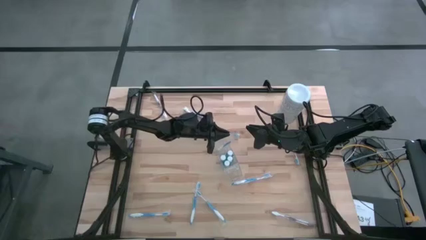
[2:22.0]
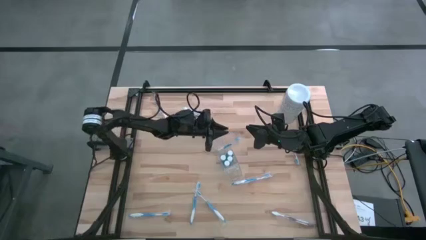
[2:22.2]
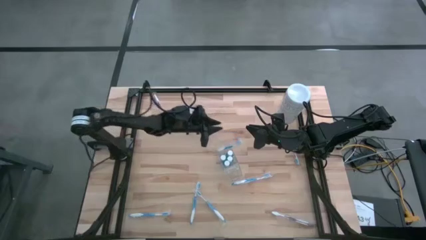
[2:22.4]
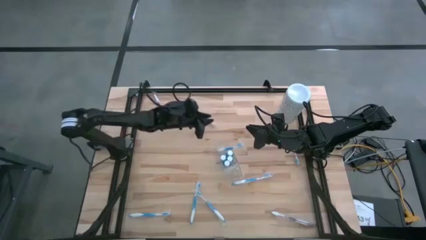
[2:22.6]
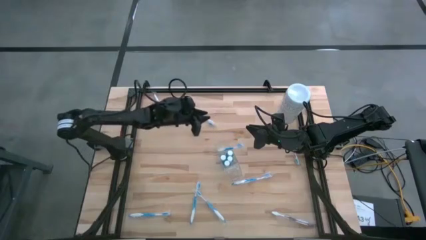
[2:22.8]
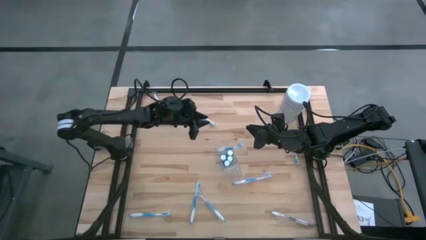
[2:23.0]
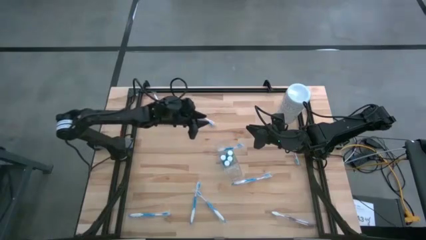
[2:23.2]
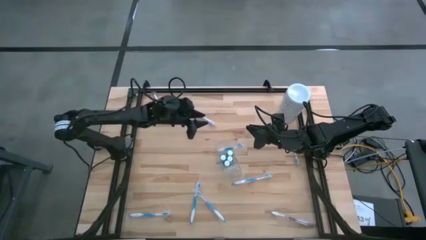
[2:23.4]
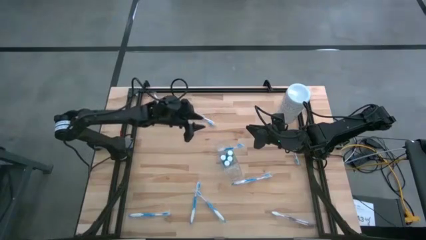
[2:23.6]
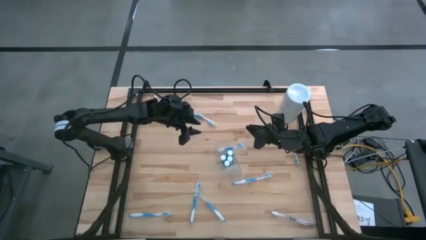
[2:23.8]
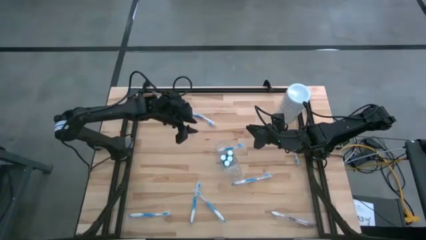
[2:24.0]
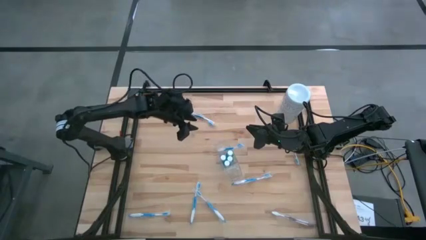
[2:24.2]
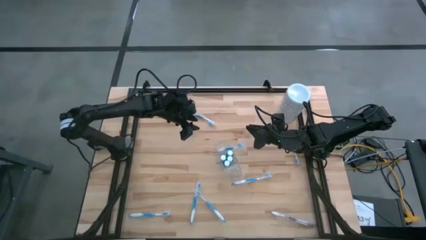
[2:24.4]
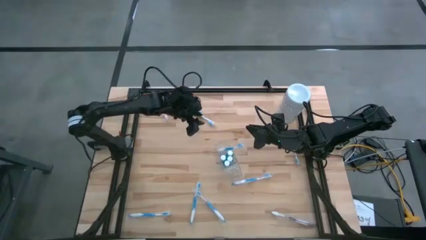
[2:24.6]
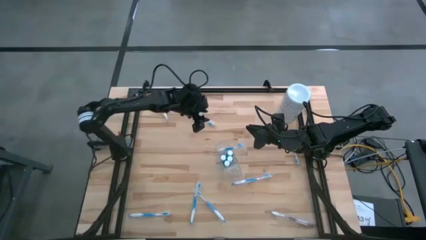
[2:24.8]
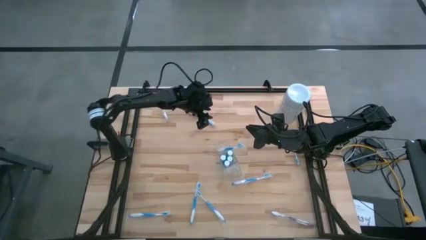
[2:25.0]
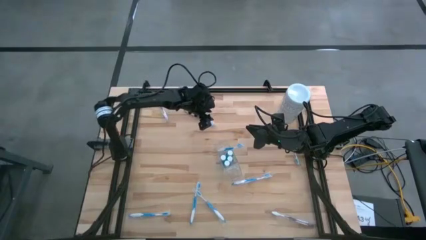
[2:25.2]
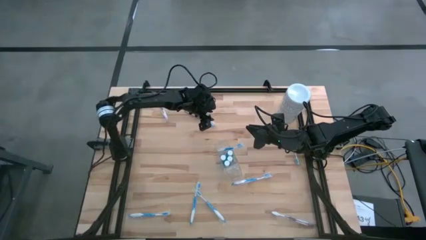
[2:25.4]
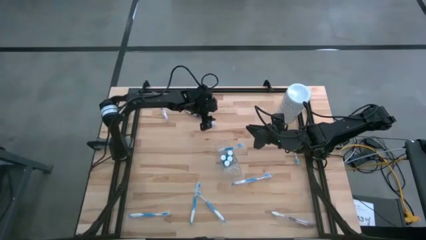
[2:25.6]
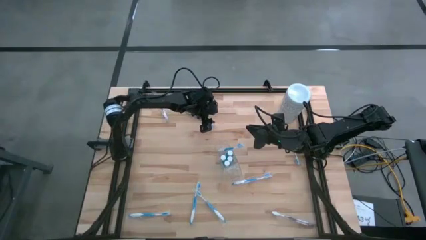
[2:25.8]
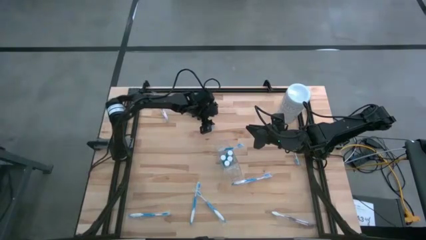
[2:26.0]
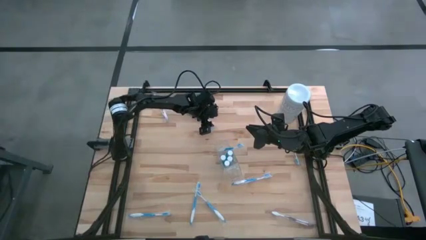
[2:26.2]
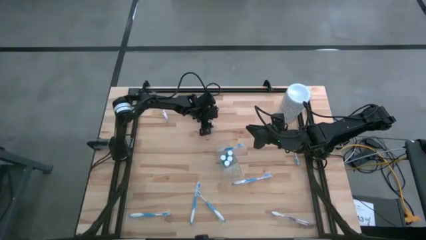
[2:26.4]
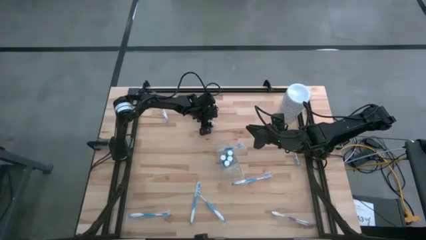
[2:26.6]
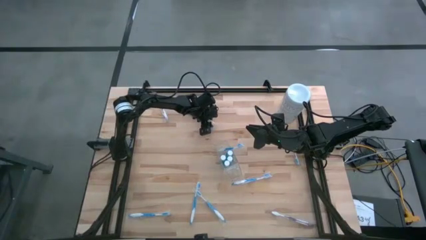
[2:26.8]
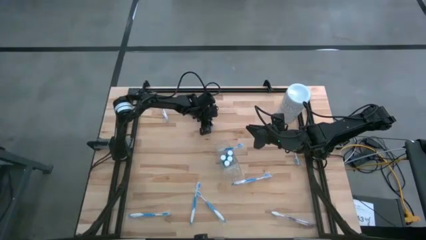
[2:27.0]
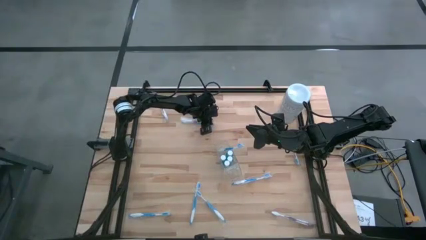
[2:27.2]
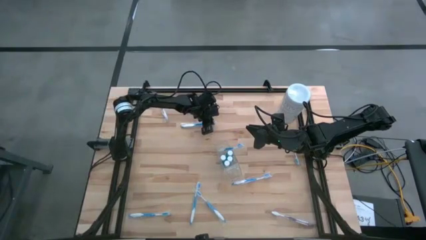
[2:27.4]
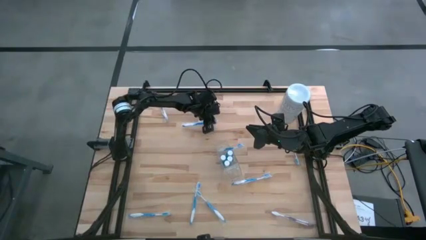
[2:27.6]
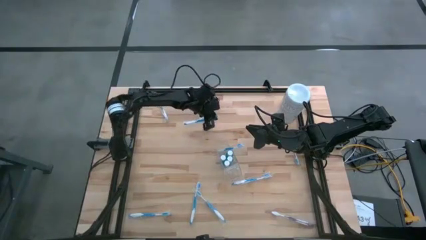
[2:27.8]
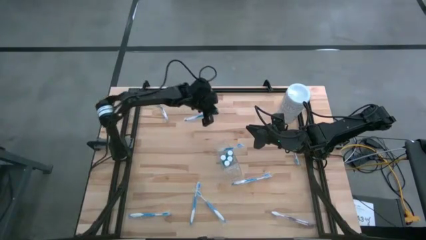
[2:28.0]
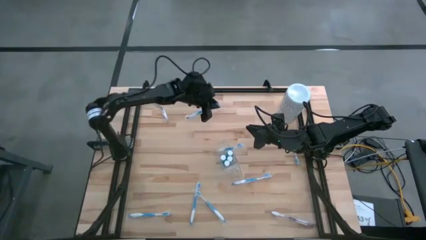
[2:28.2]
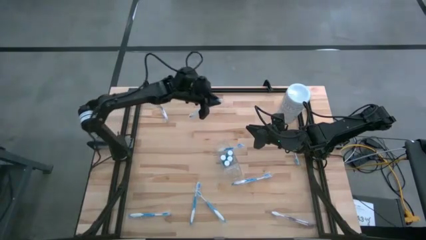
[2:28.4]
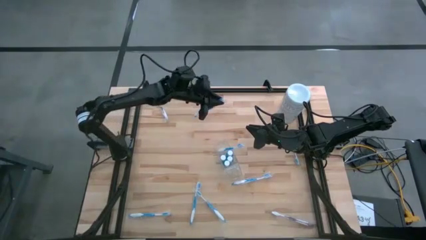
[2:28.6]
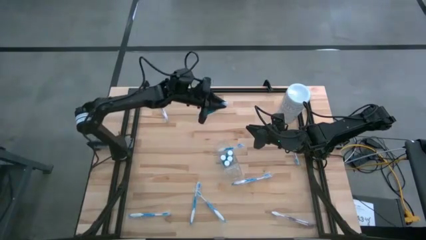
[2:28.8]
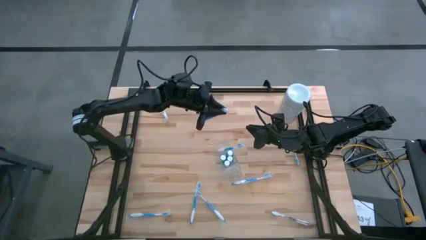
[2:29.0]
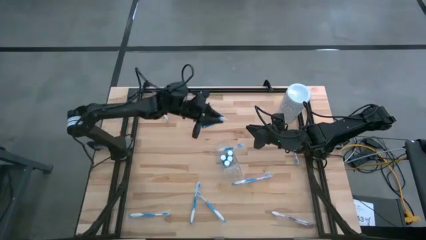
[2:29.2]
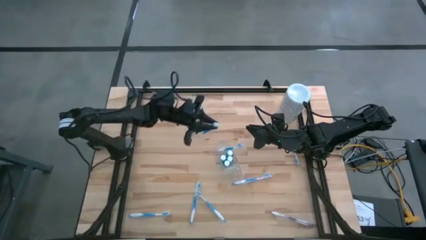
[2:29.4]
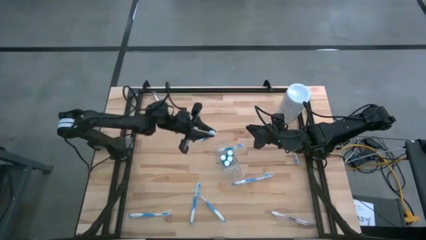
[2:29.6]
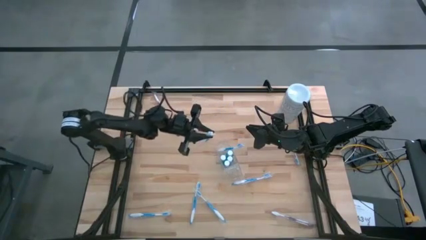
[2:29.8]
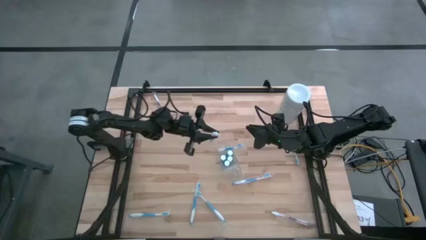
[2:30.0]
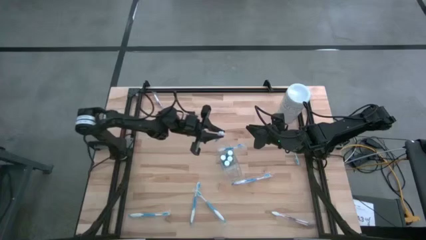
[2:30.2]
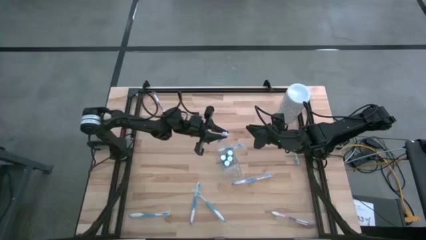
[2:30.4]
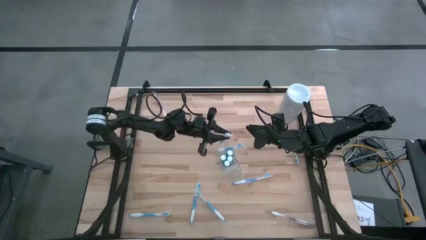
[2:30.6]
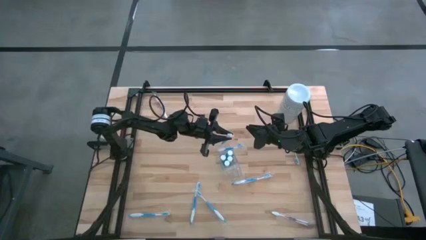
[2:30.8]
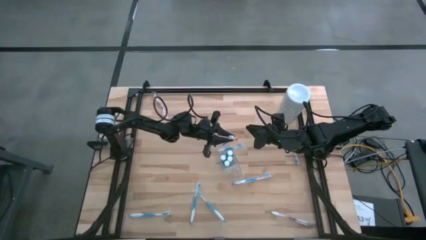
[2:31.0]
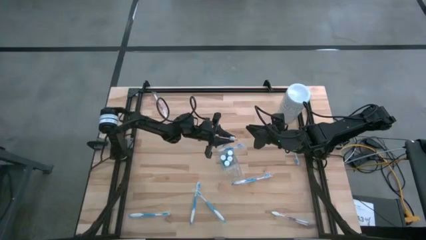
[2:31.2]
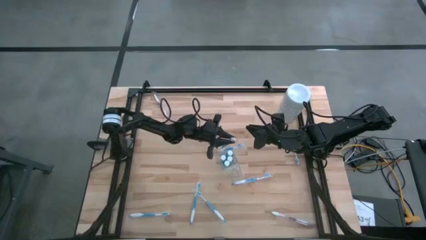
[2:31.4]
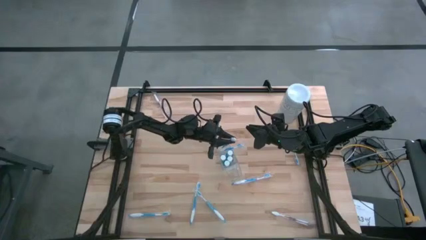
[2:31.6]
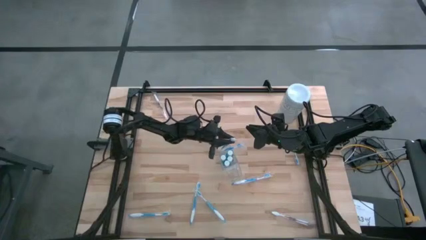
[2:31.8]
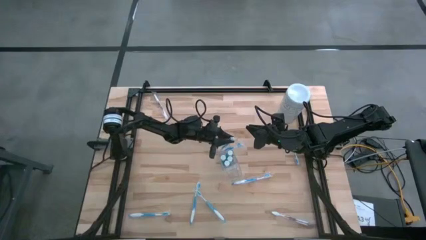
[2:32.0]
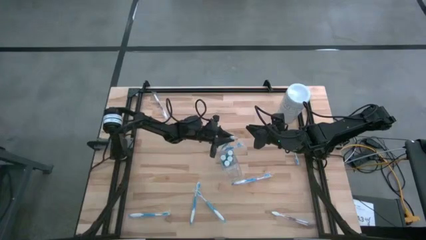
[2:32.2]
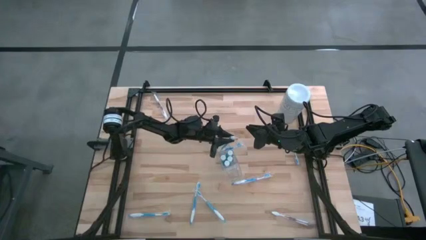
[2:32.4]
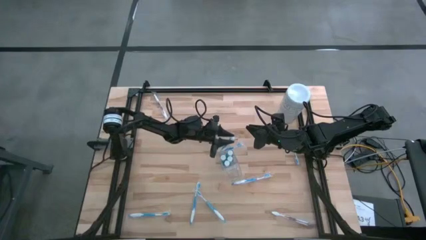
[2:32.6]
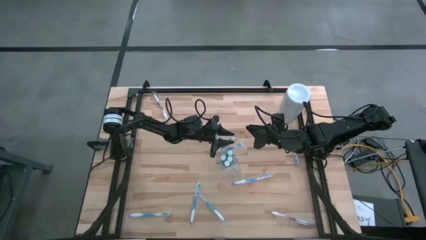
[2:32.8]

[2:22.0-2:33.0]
Task: Pick & Place toothbrushing station
Put the blue toothbrush into the left section of the transparent organizer

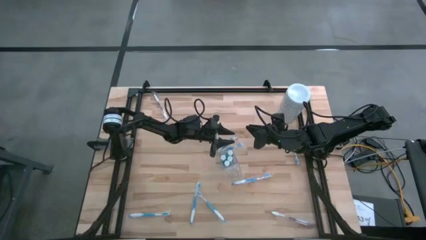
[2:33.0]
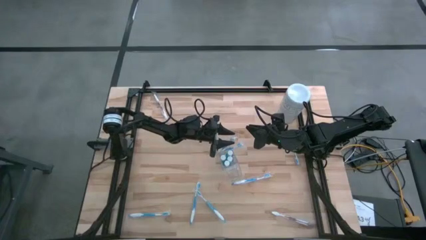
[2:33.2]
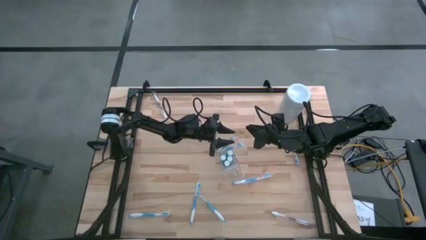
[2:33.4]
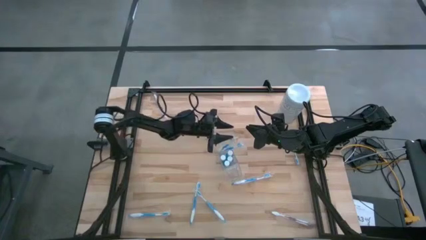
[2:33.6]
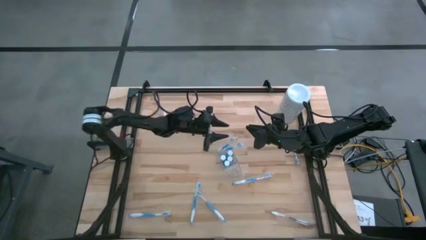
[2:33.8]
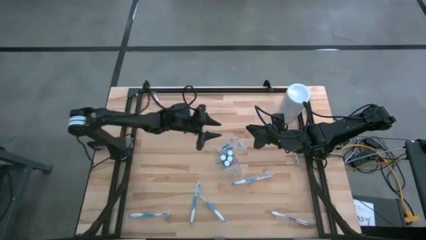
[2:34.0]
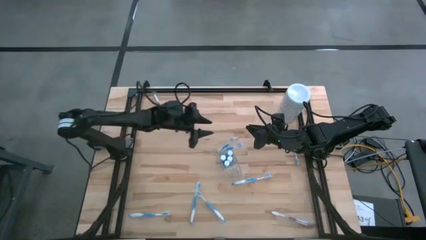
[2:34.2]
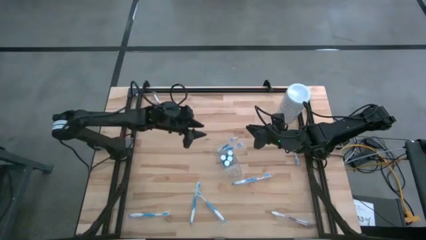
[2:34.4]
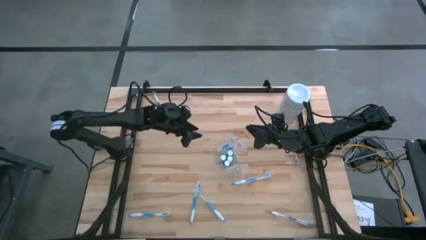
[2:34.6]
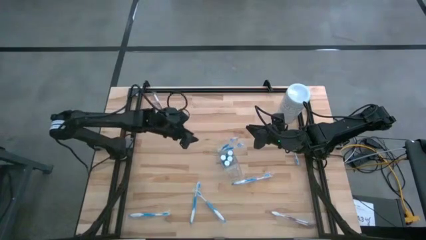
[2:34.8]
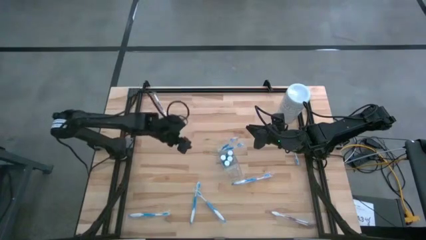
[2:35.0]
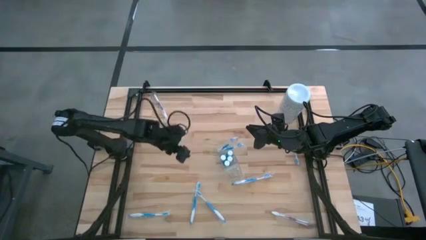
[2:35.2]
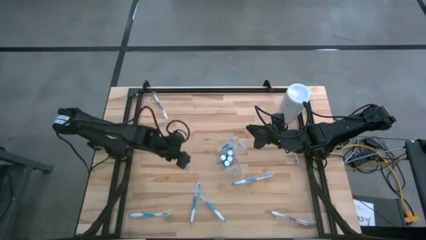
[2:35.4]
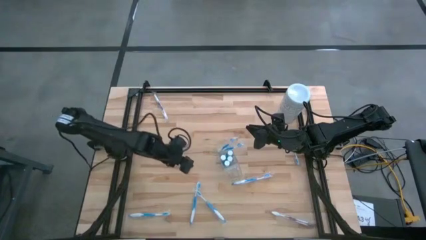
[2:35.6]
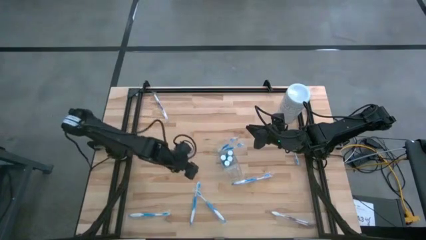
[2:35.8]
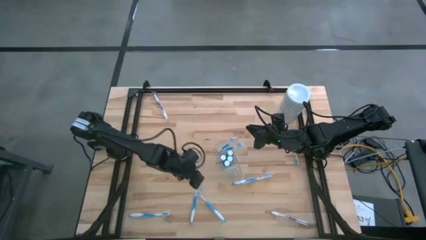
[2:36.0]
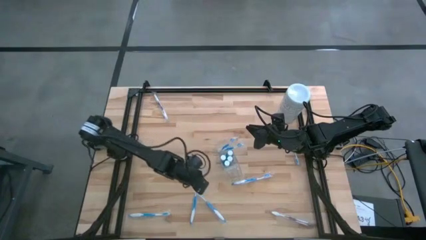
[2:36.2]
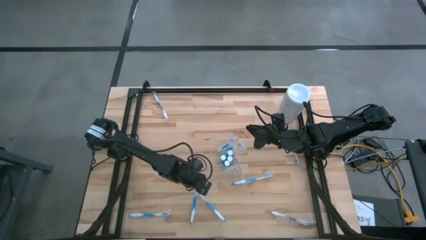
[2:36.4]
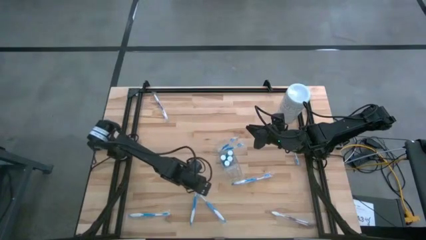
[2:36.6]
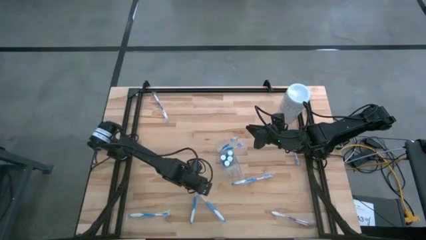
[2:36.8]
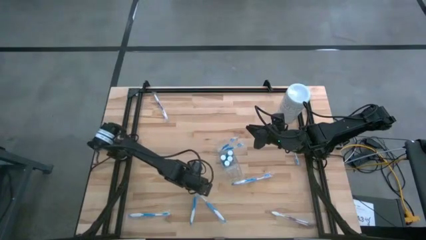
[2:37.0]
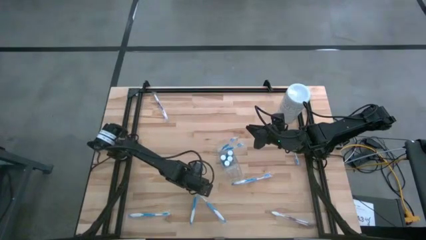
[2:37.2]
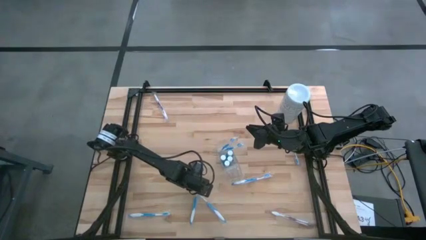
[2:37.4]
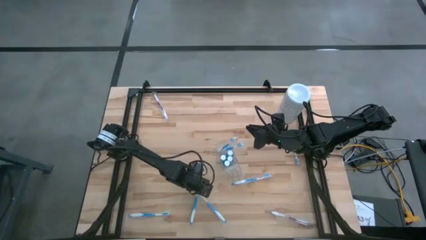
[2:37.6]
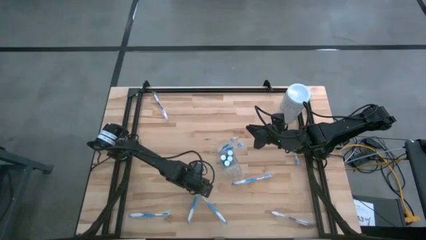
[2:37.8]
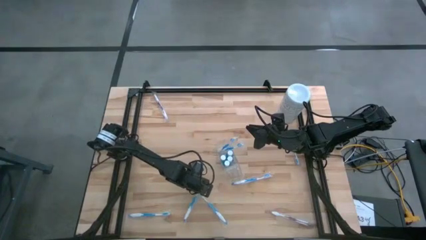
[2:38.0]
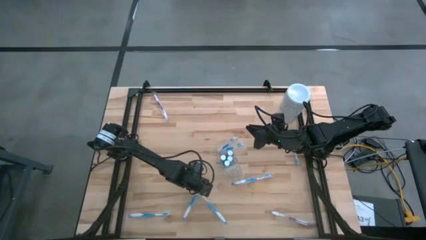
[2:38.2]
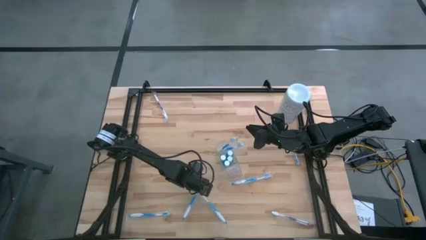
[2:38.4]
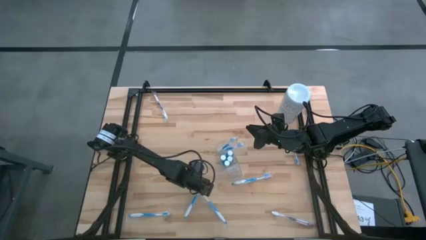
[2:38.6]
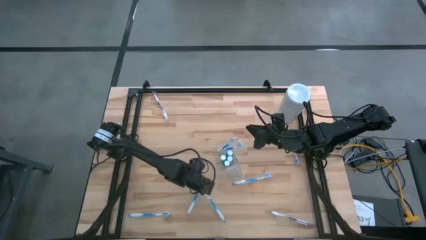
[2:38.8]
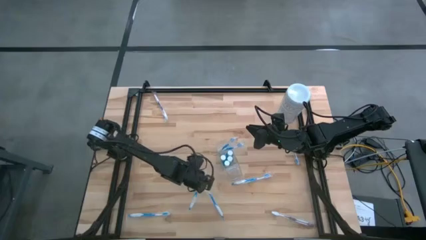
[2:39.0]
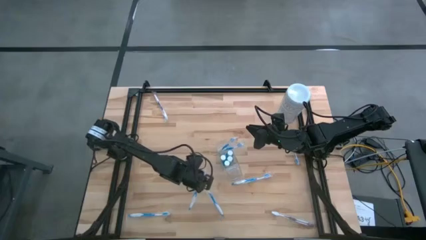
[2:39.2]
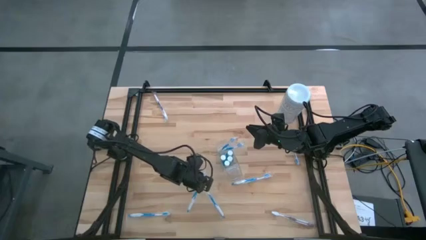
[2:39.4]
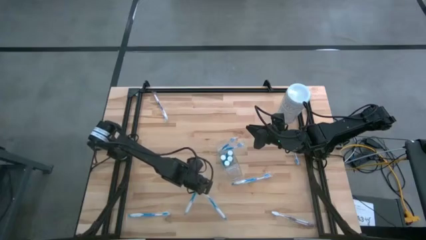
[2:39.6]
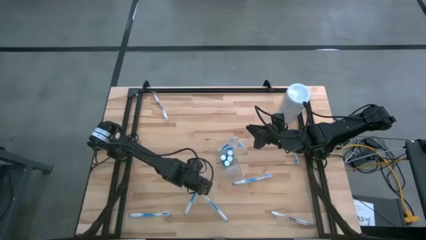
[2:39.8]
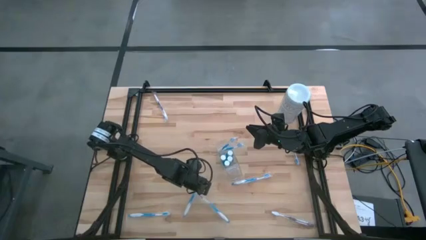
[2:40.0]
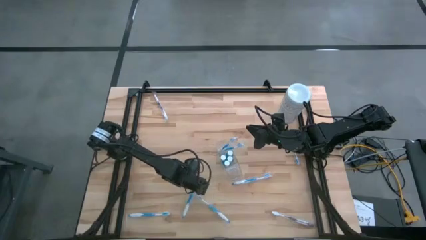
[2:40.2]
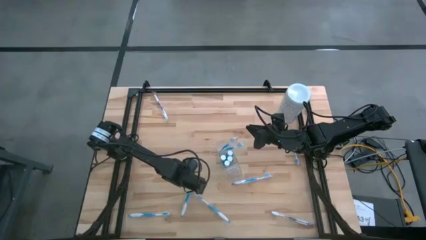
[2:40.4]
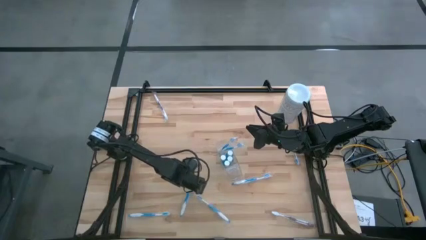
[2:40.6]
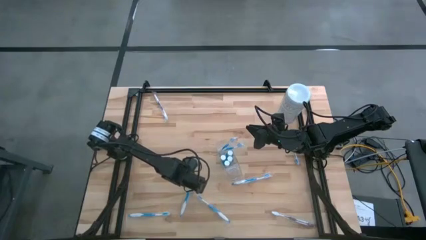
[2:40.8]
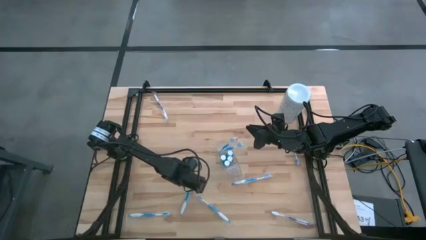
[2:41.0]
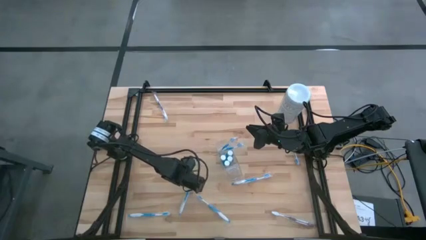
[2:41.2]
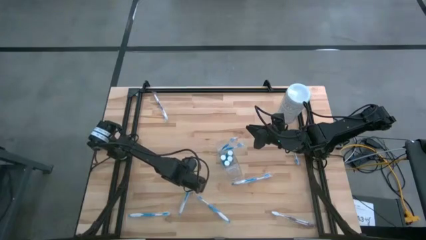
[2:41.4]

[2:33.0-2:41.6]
Put the blue toothbrush into the left section of the transparent organizer
